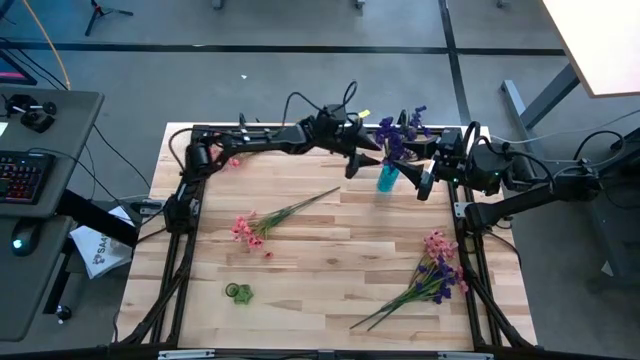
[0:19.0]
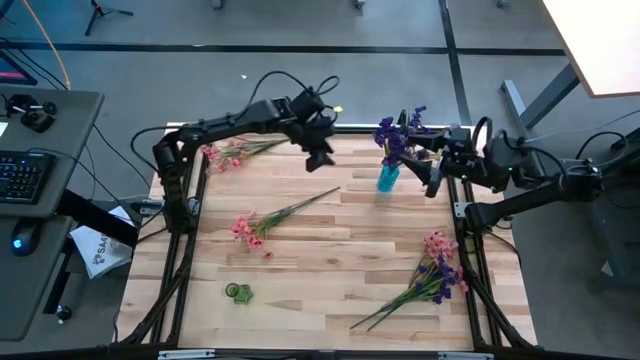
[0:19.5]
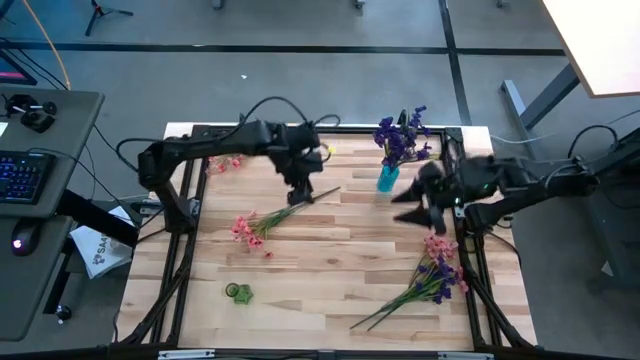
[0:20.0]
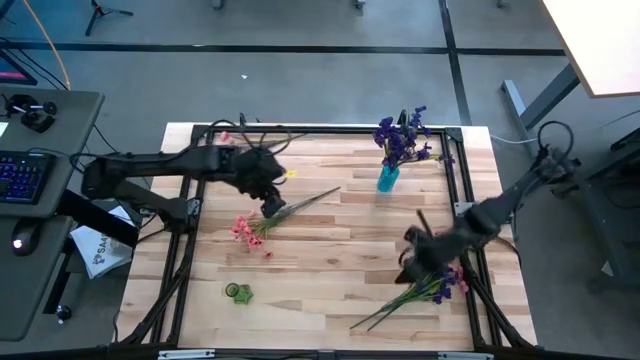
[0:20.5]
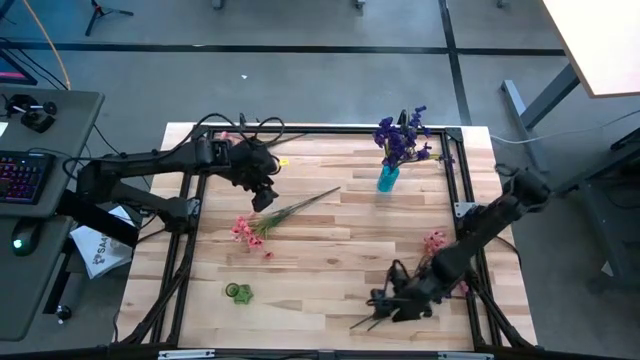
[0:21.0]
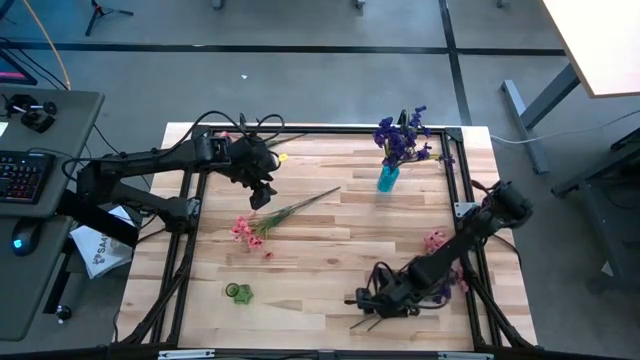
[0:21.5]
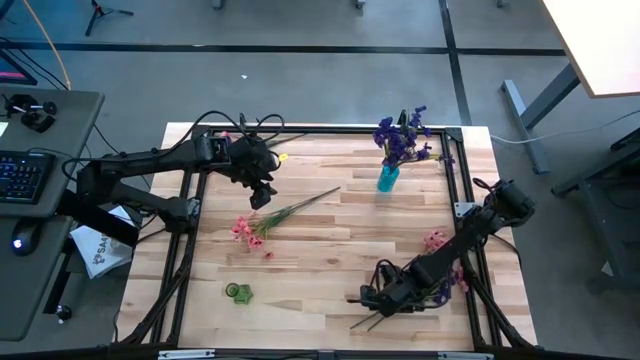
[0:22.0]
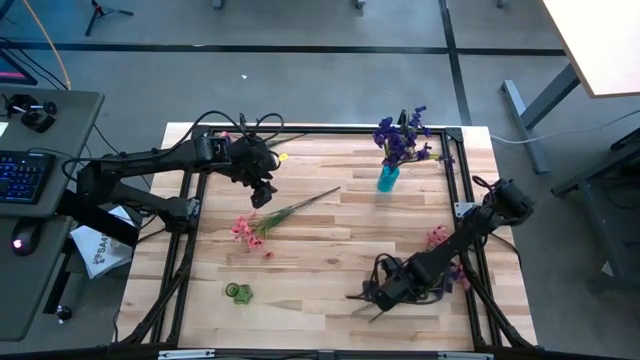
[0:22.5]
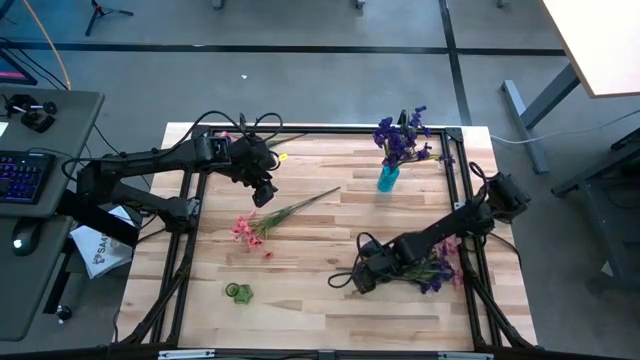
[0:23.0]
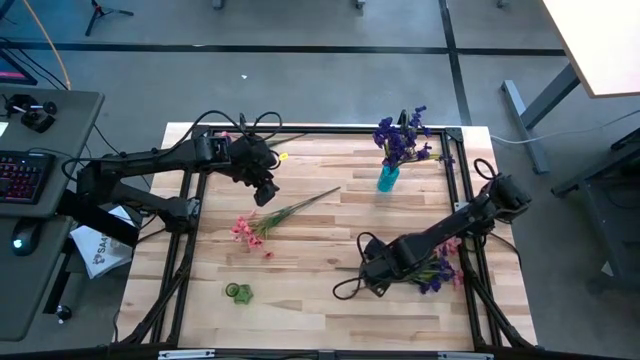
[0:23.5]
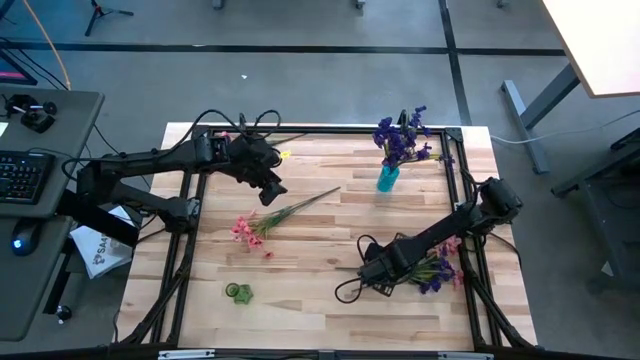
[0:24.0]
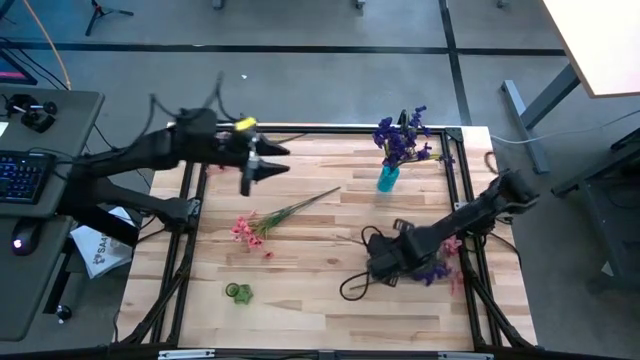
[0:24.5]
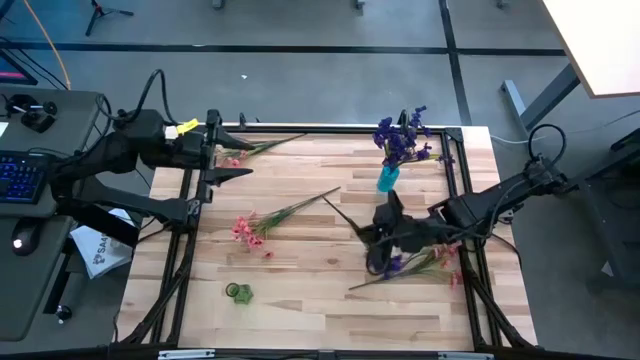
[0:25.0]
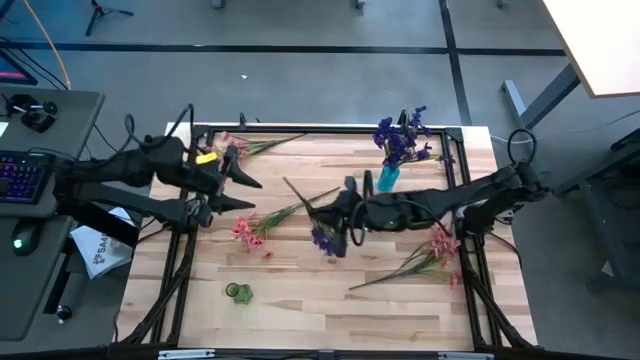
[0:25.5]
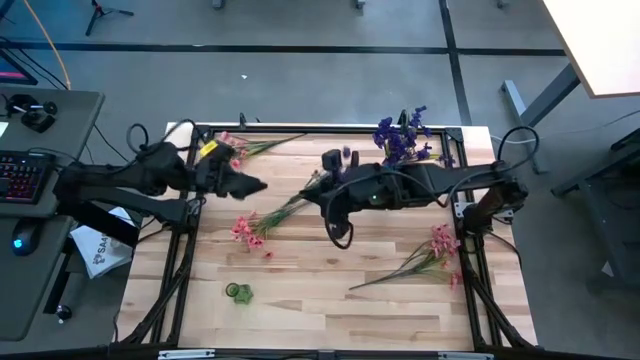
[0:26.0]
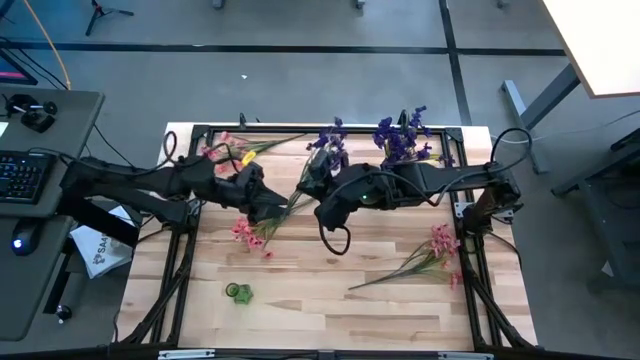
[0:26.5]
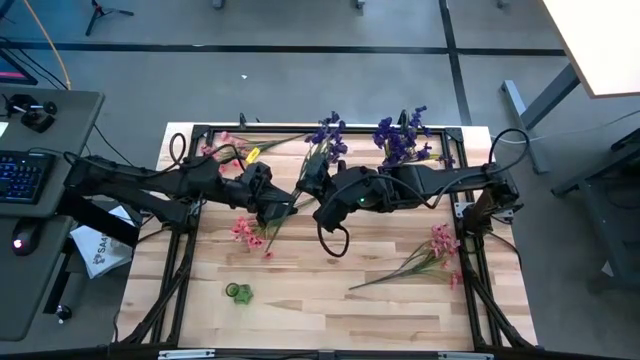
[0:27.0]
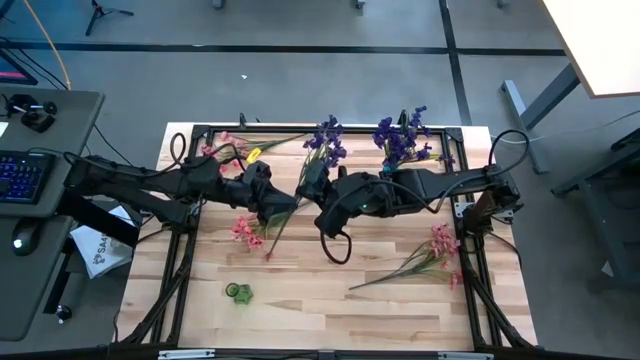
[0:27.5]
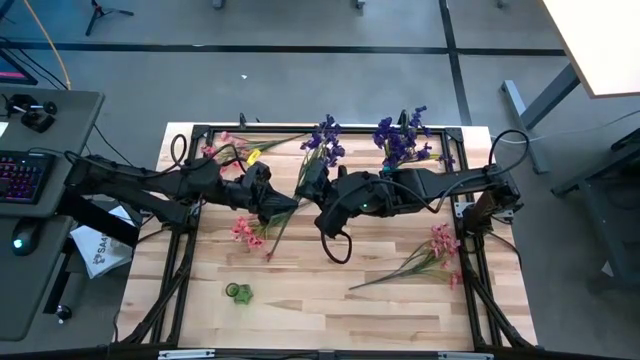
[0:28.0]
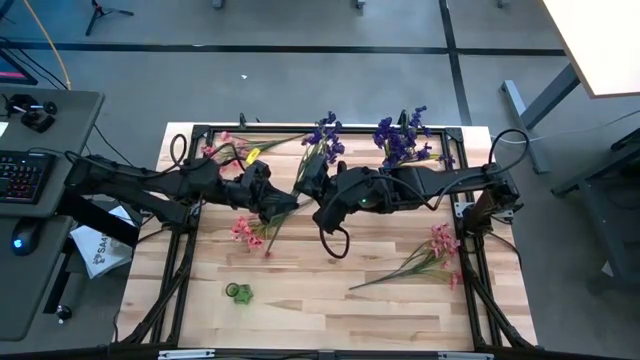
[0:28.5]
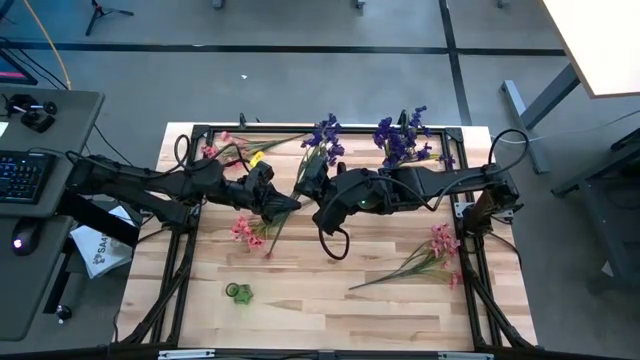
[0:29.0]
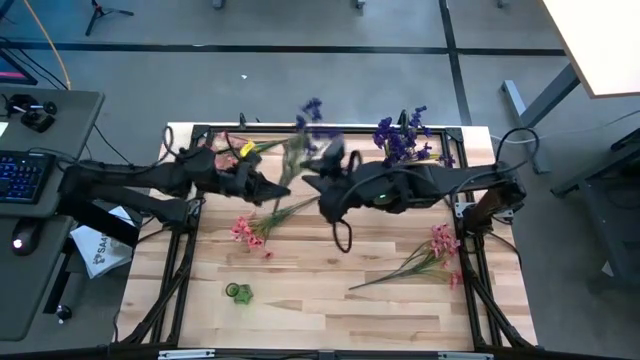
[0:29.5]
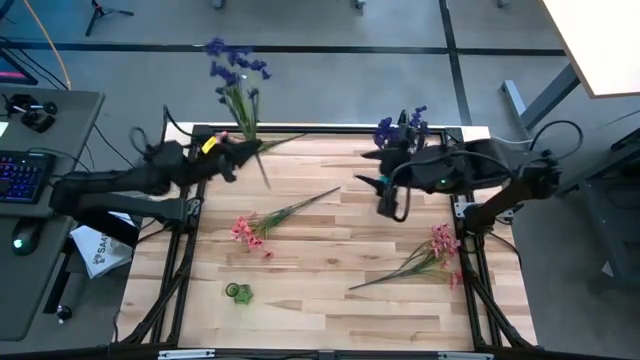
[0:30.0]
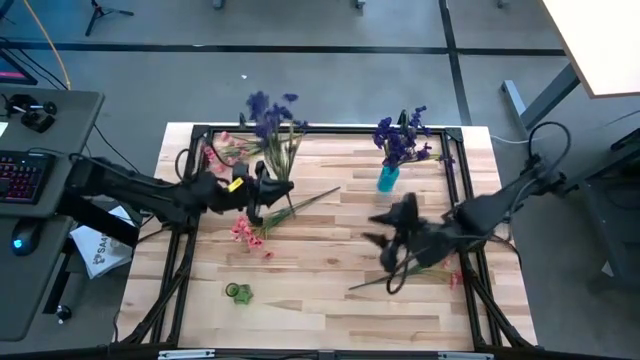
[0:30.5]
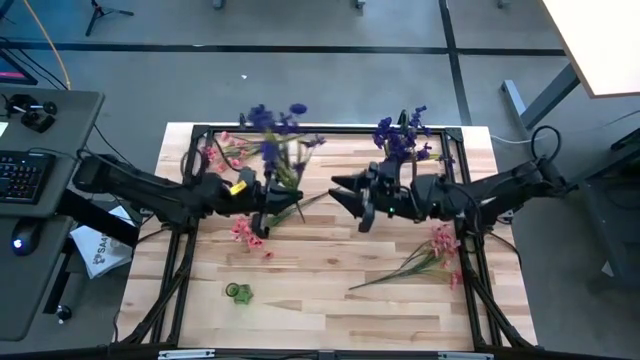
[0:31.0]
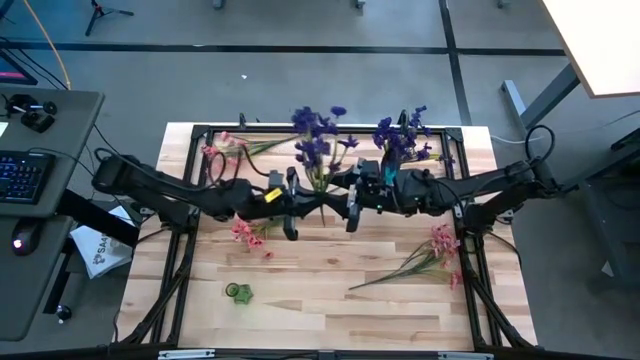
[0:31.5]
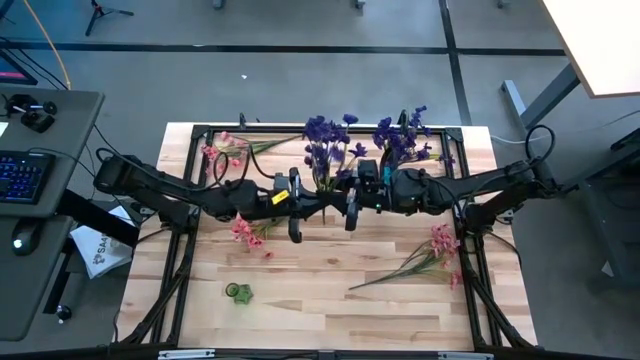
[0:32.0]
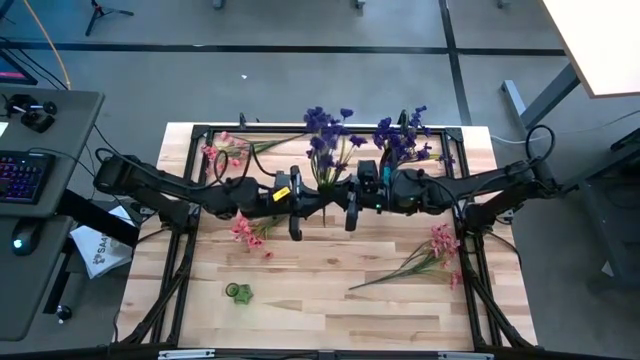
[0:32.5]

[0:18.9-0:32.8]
Task: Sort flowers into vase by color
Put the violet flowers into the blue vase
